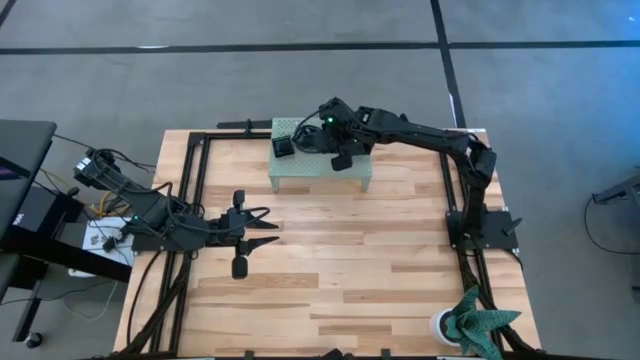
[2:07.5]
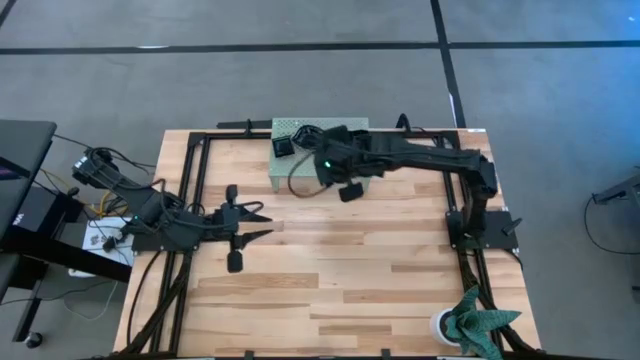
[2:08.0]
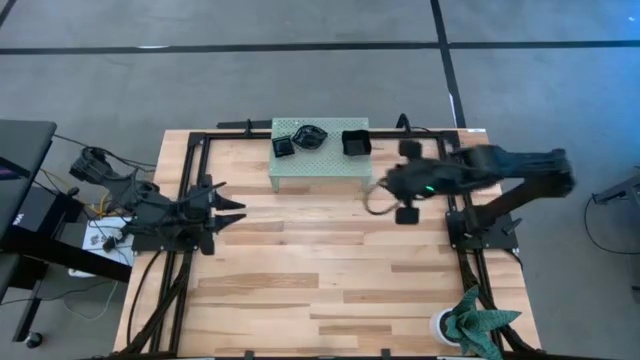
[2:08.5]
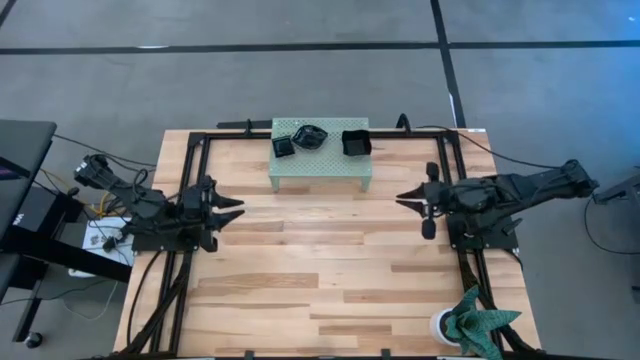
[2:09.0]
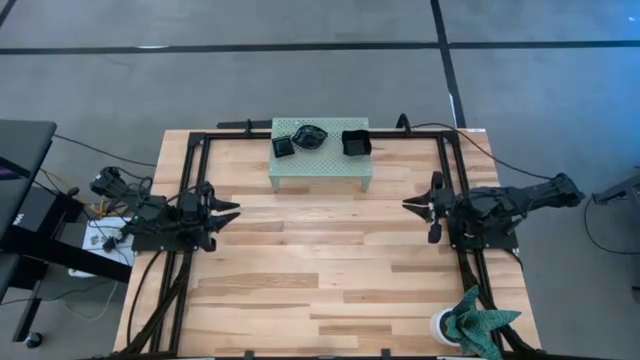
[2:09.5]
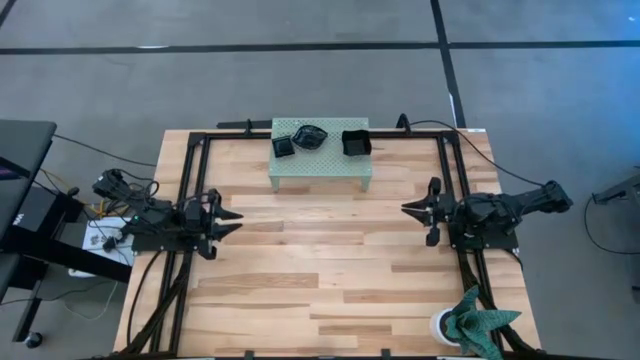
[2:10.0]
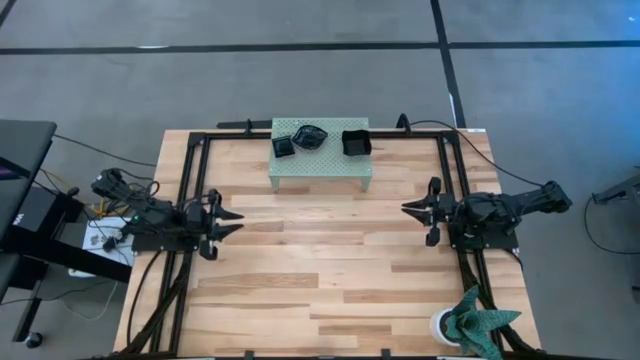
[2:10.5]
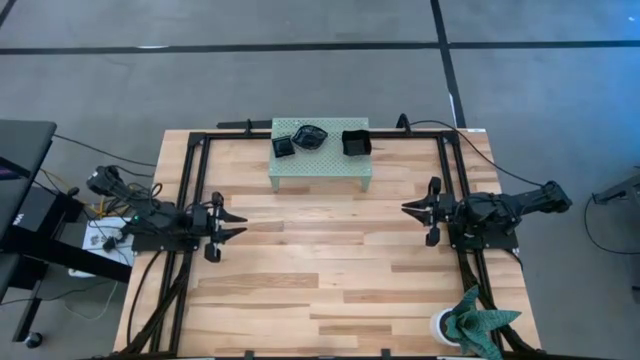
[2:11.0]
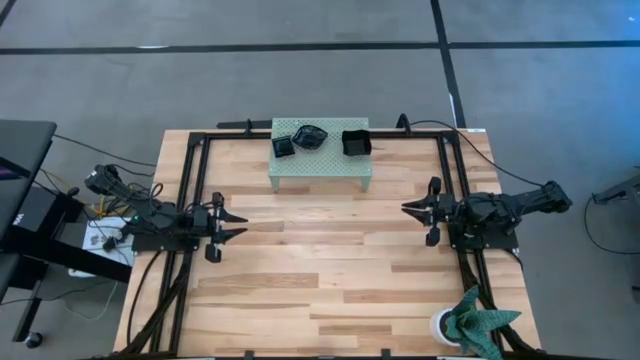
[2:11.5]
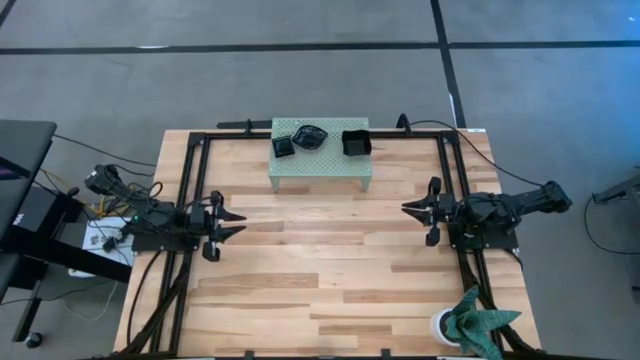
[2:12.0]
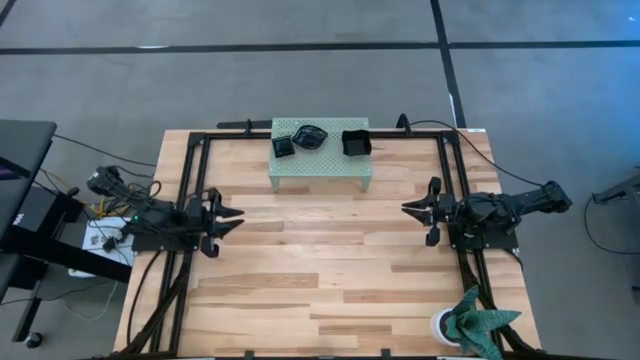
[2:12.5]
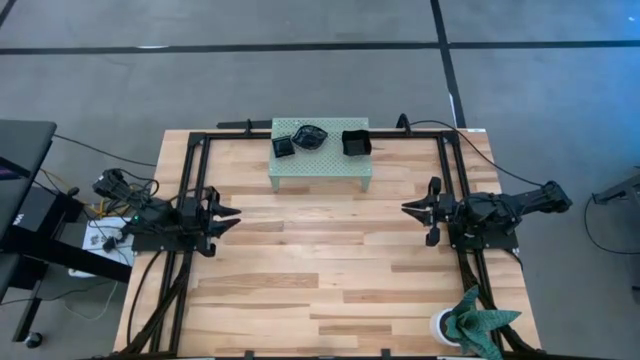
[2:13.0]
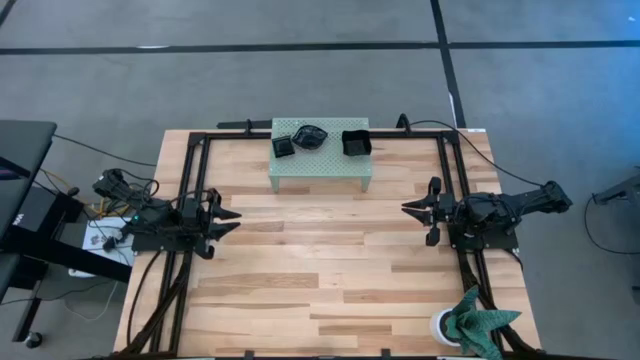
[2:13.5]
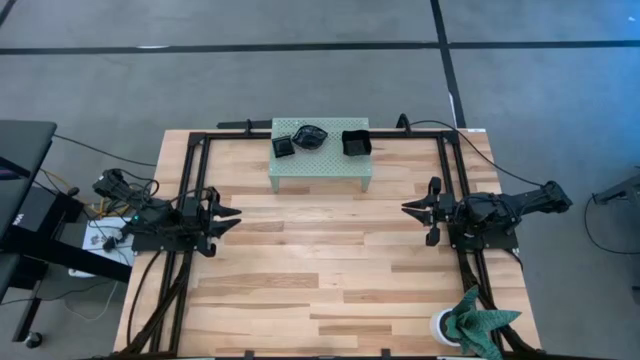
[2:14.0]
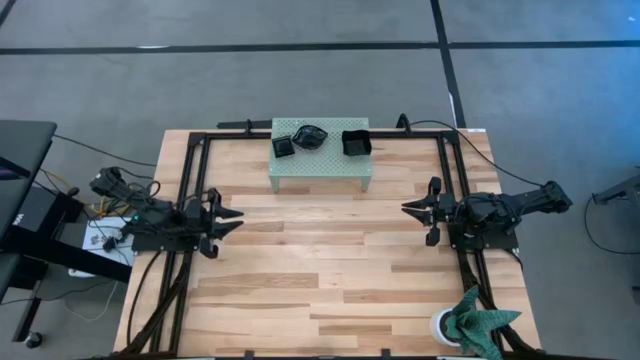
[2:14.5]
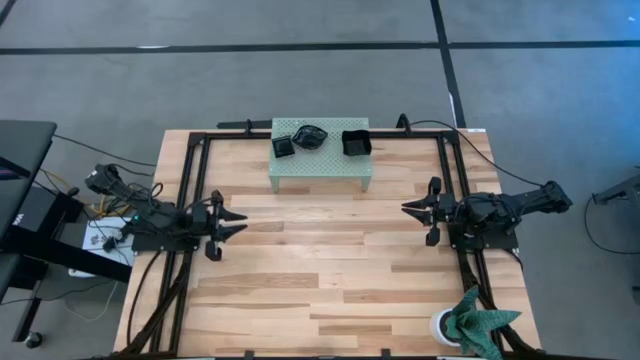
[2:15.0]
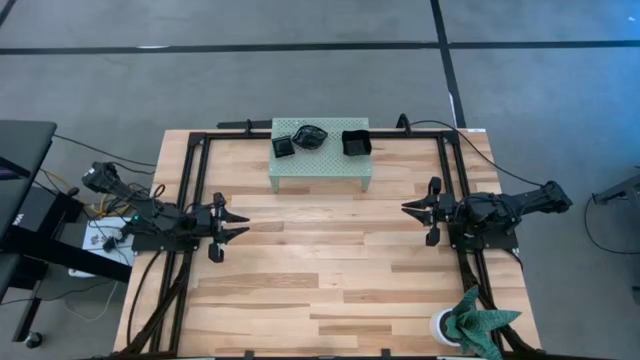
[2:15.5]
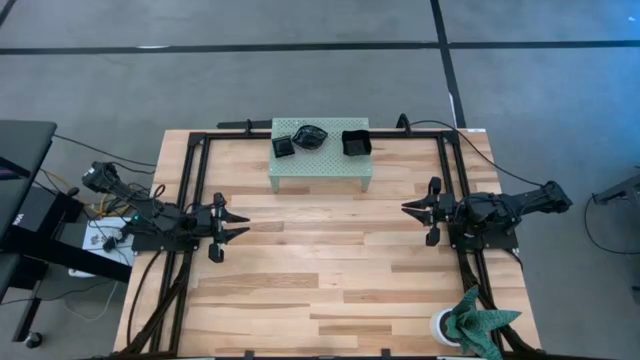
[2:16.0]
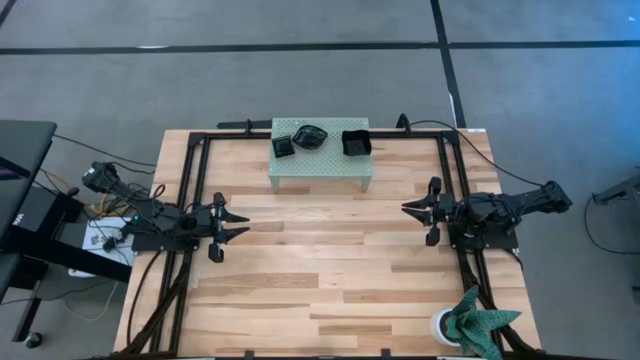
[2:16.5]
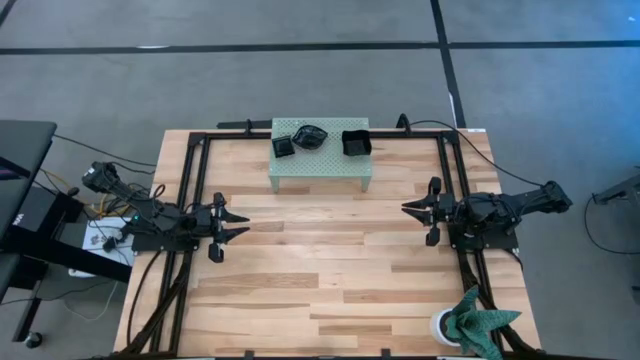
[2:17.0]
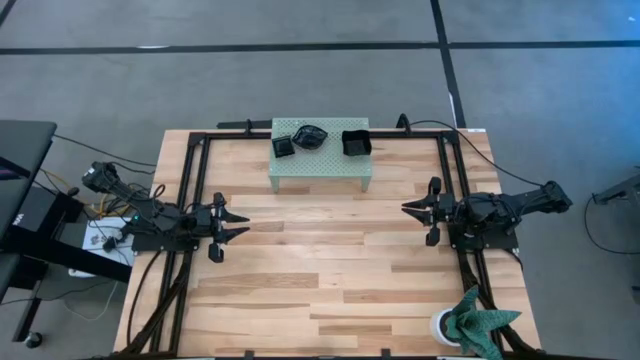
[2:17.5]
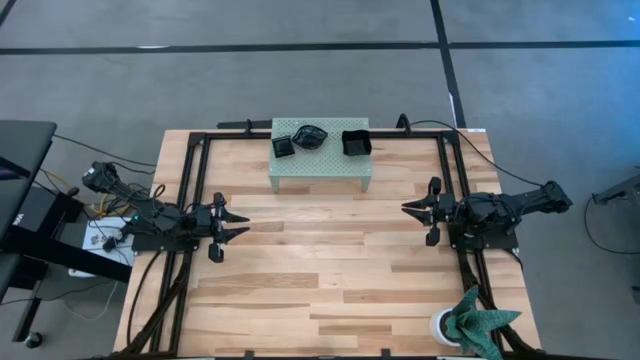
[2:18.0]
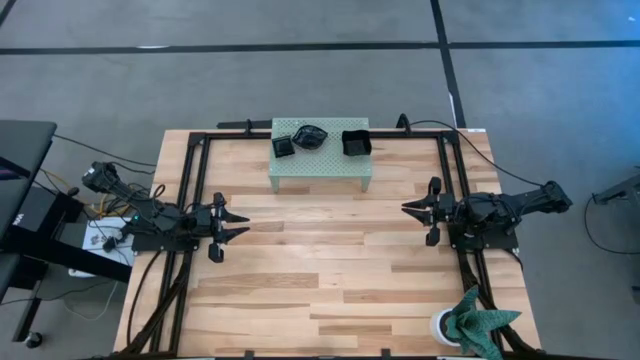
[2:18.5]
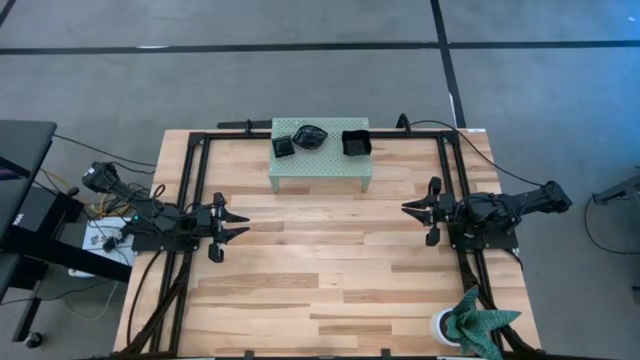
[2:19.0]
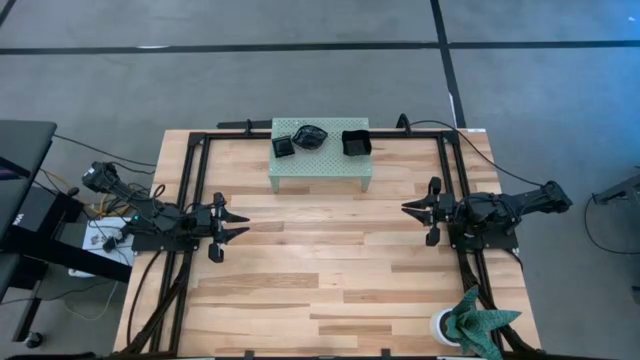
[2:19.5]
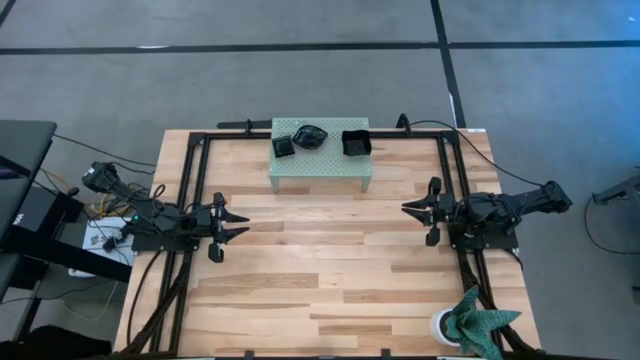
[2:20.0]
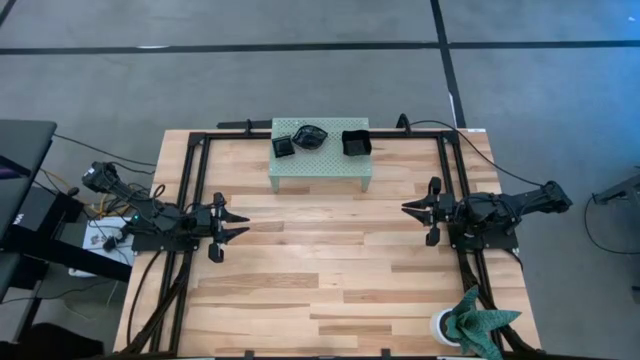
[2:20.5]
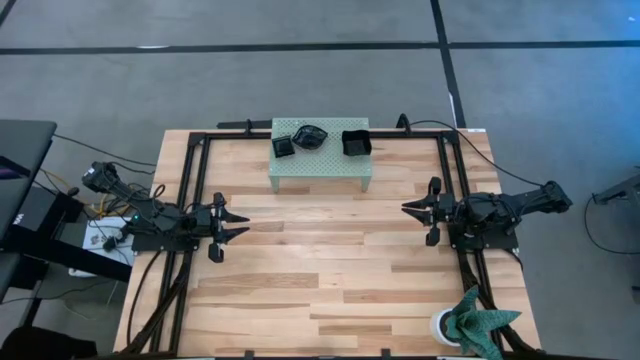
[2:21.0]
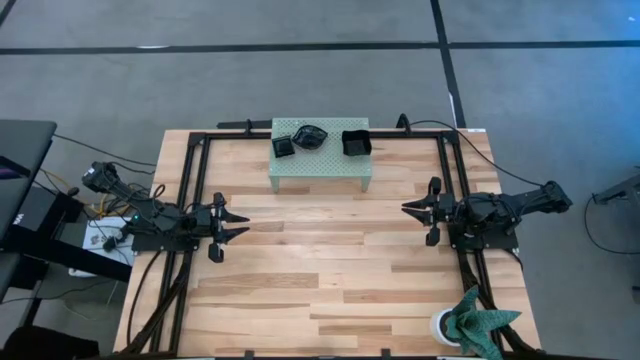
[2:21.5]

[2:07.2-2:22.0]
Task: Pick & Place Mini shaped plates
Return to Home Position

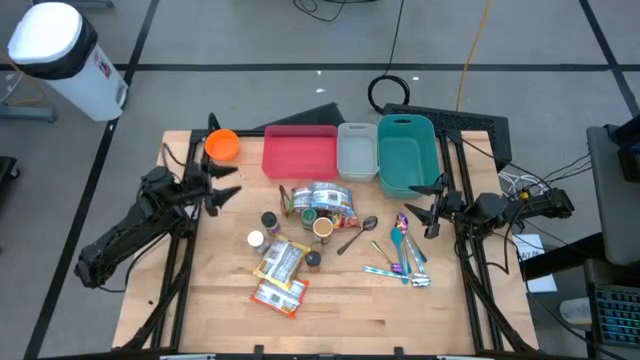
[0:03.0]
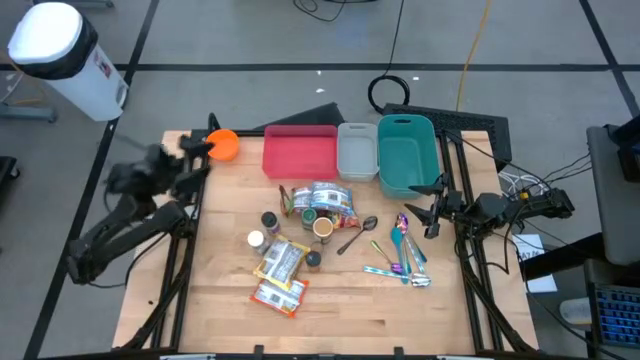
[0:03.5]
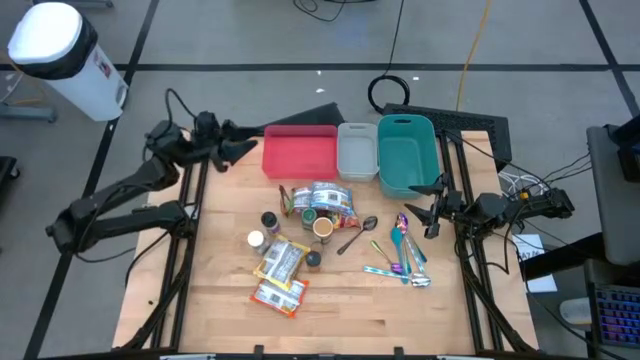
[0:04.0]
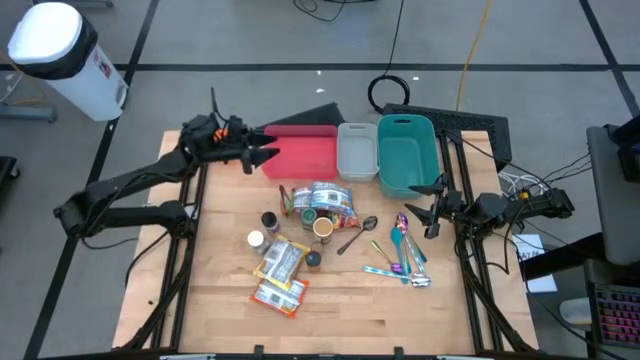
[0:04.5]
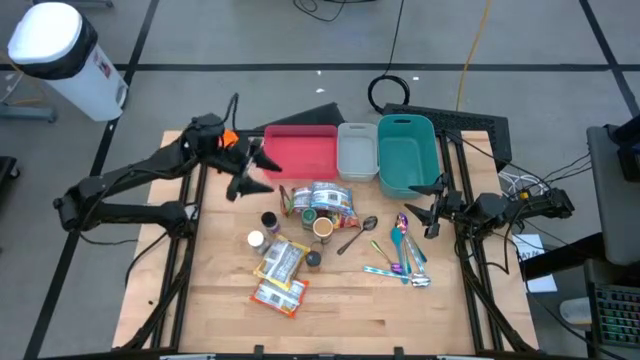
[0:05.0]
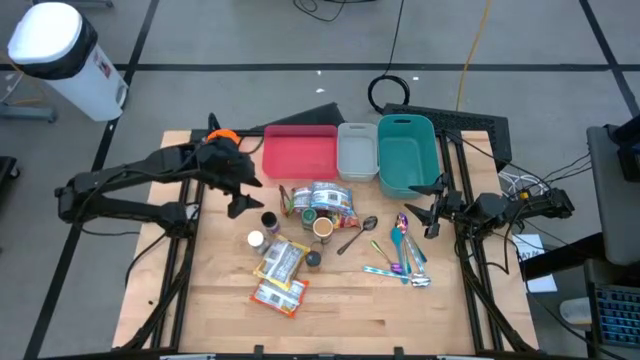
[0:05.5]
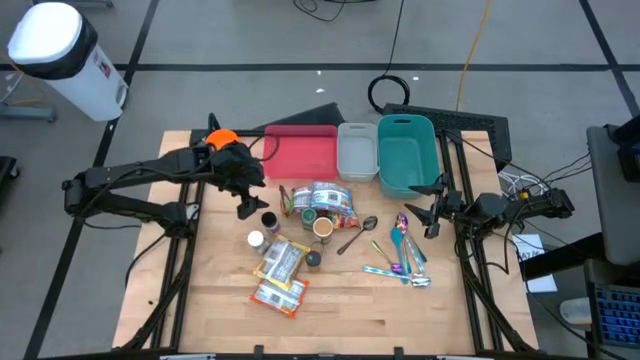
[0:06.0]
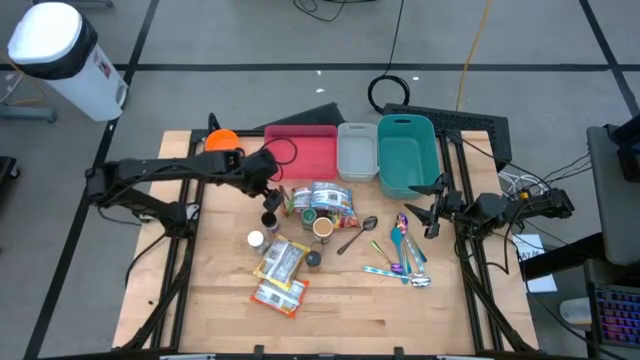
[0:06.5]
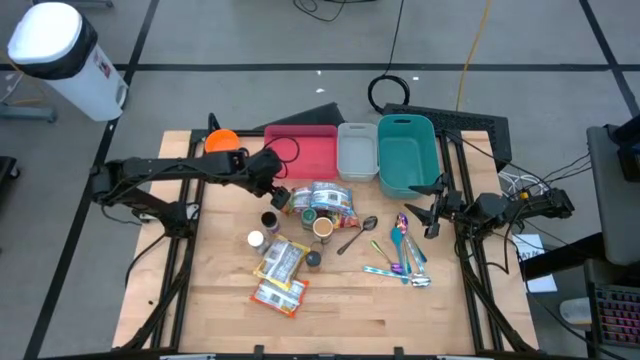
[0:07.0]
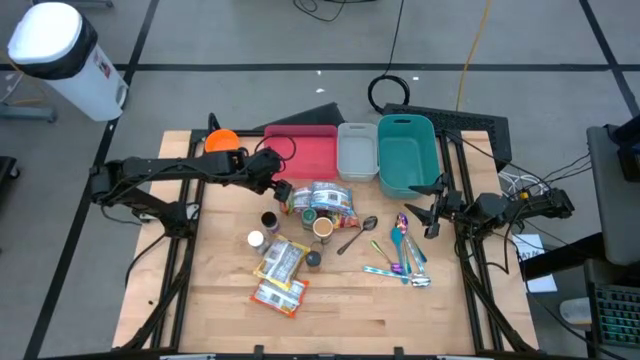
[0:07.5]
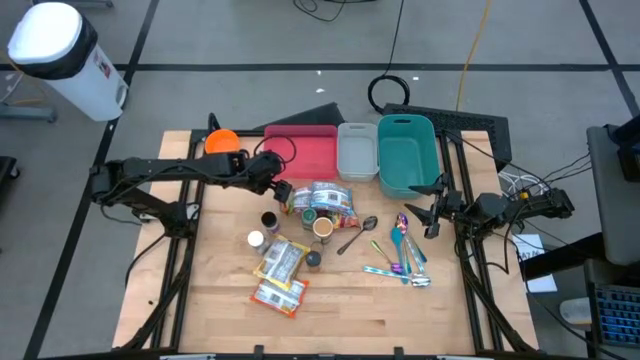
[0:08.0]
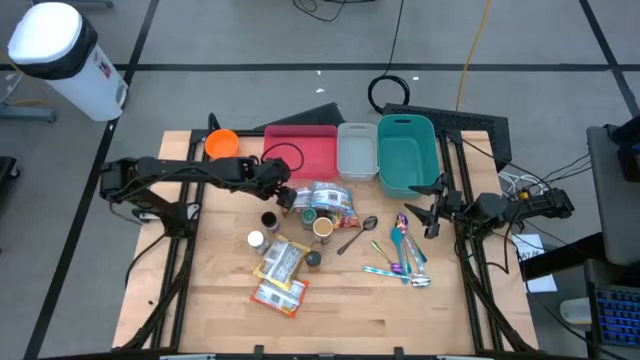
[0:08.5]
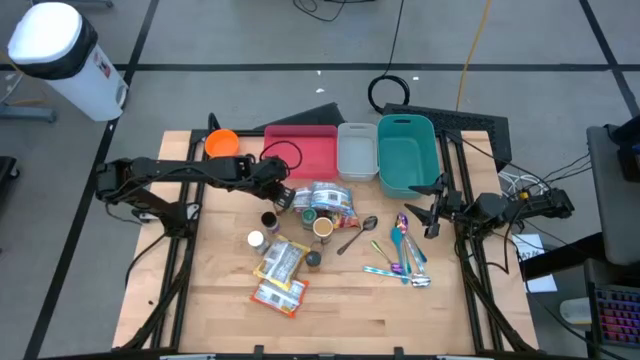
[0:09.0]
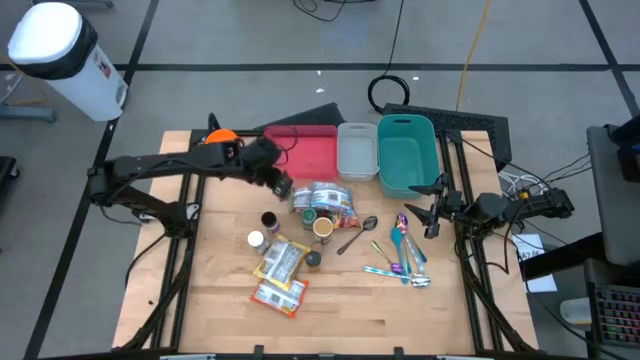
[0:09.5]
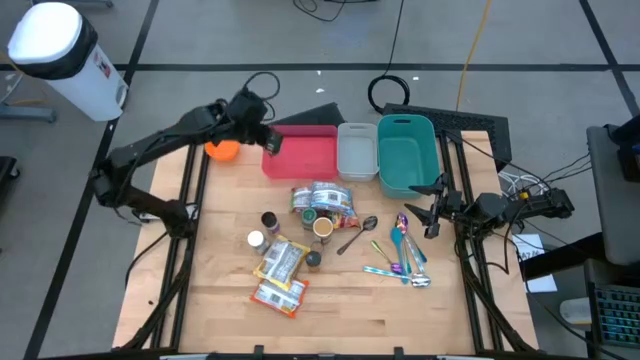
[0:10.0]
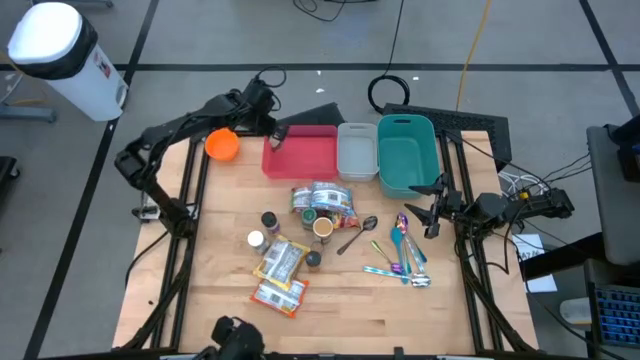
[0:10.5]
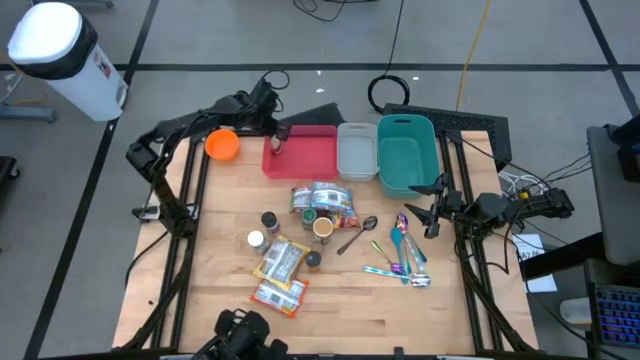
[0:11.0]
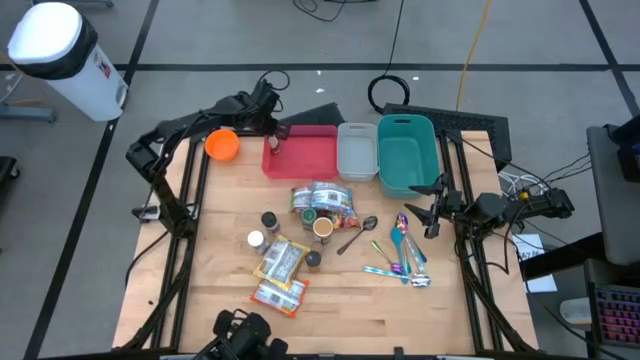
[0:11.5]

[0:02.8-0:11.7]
Task: Pick & Place Food Item
Put the orange seasoning bag into the red bin
